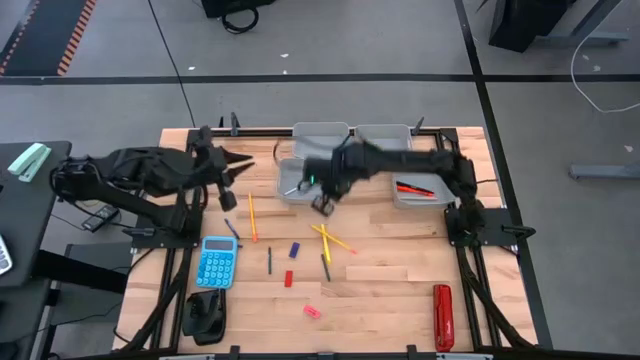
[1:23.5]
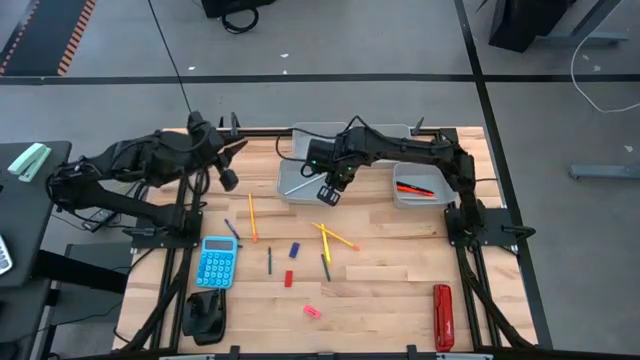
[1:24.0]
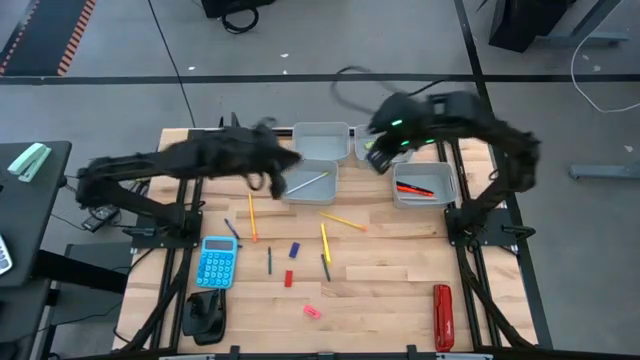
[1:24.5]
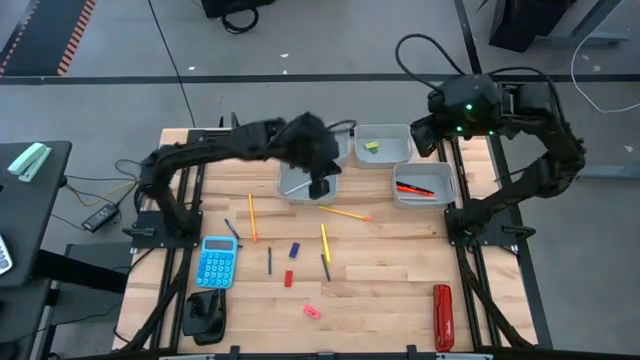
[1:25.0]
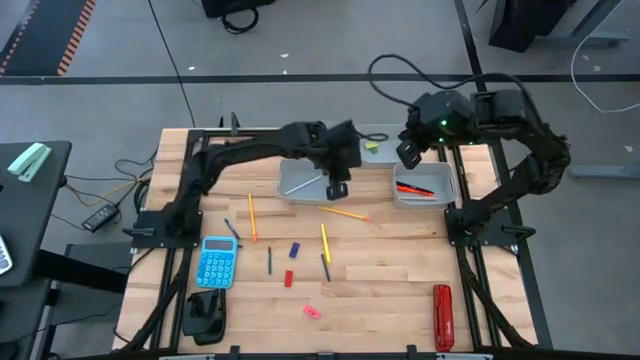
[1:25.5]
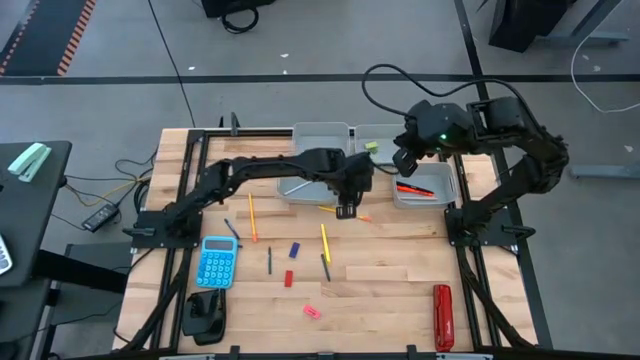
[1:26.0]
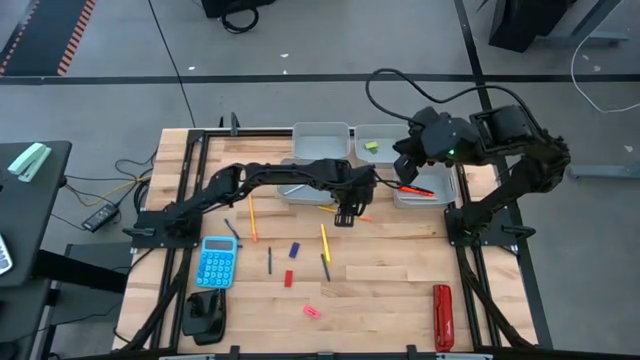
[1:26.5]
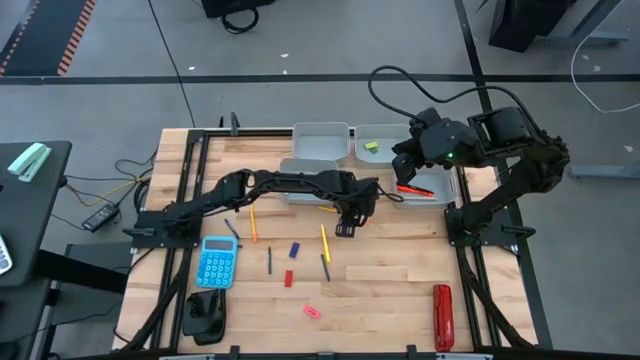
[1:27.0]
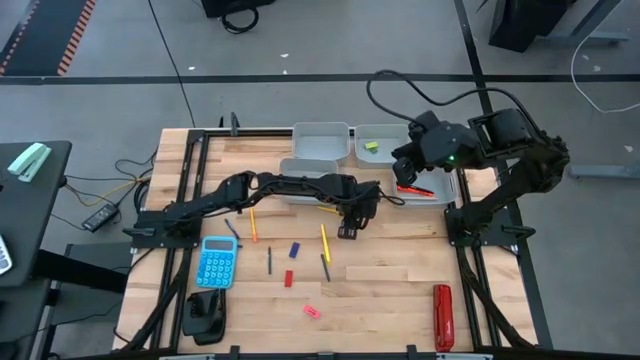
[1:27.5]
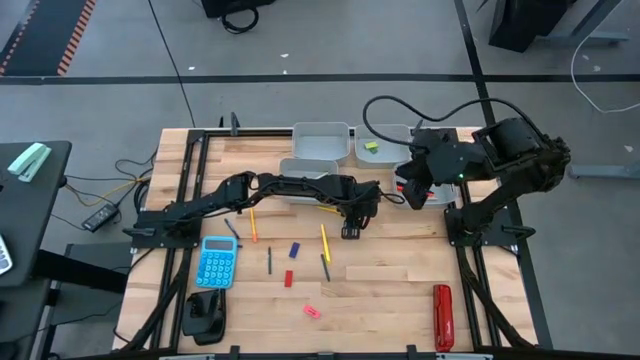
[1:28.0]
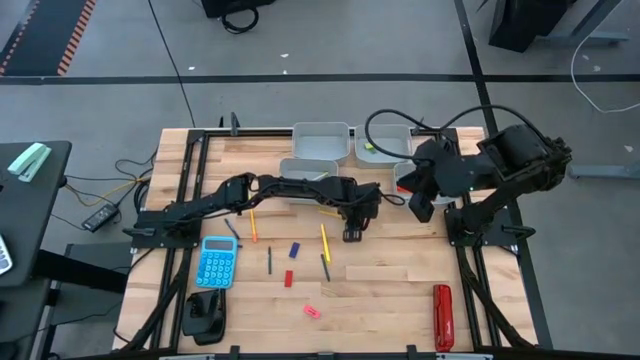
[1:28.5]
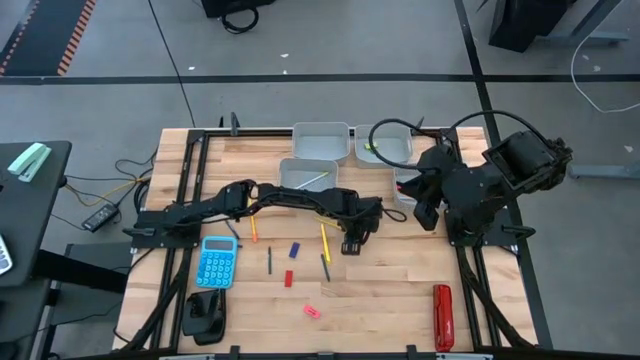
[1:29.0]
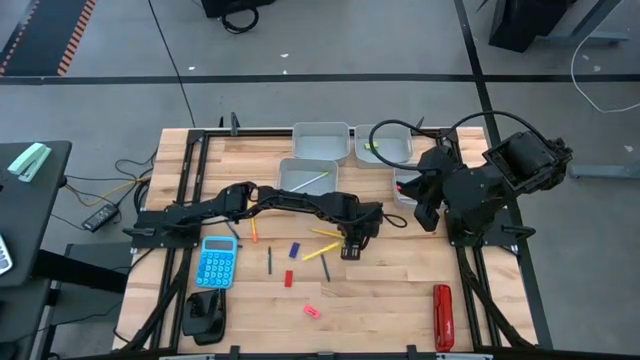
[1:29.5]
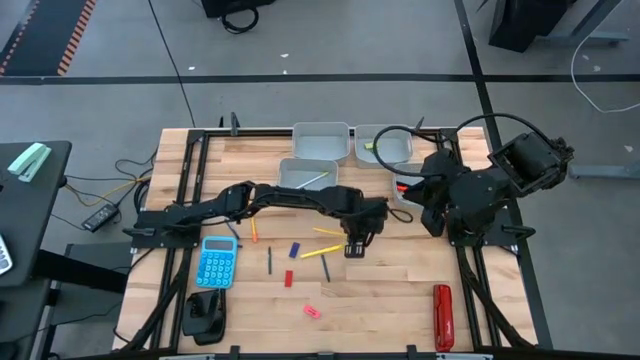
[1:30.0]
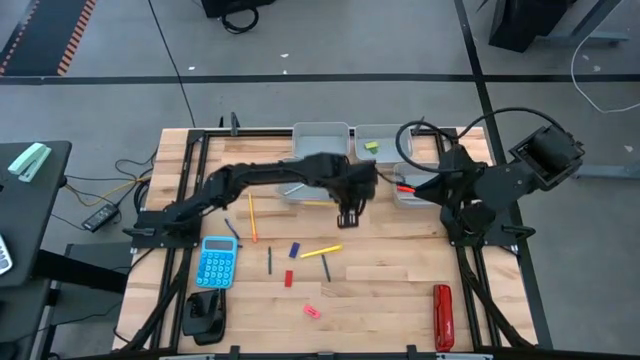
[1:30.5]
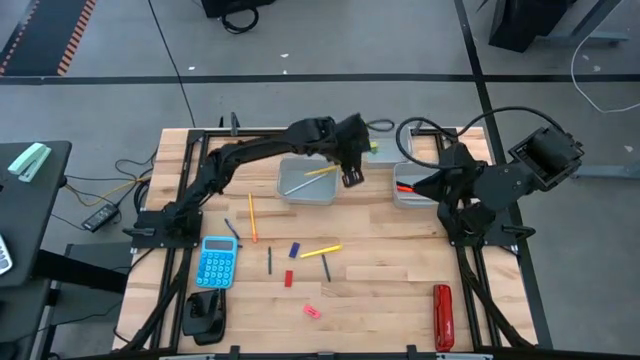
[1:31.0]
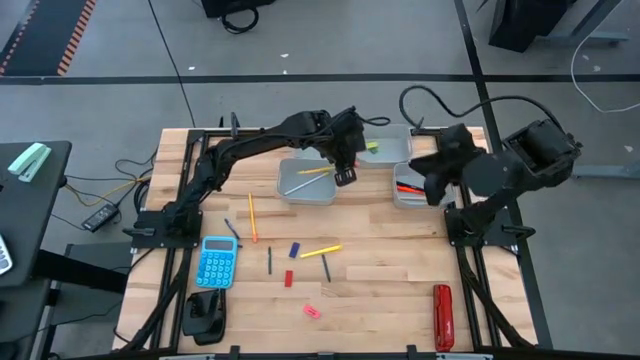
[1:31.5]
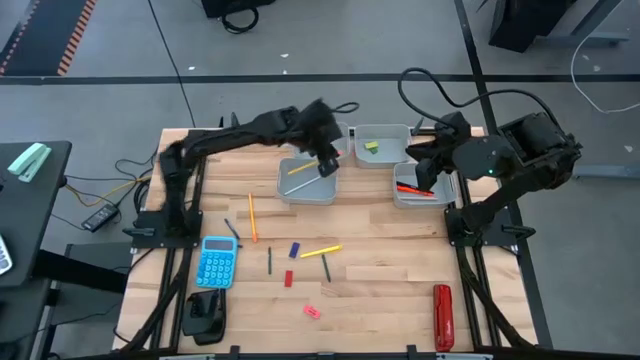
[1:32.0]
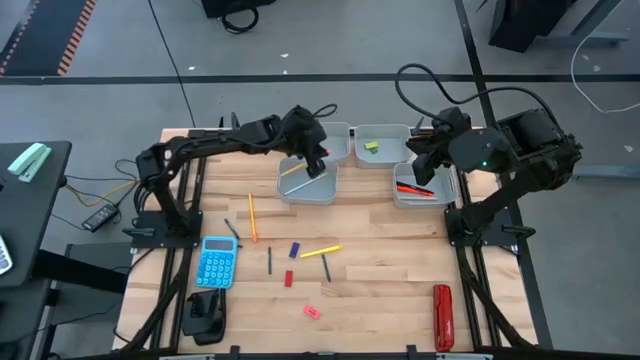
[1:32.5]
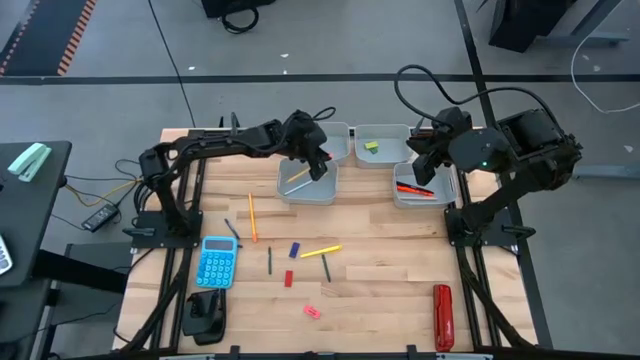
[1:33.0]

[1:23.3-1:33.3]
Task: Sort crayons/erasers/pens/pencils in bins
Put the bottom yellow pencil into the bottom left gray bin

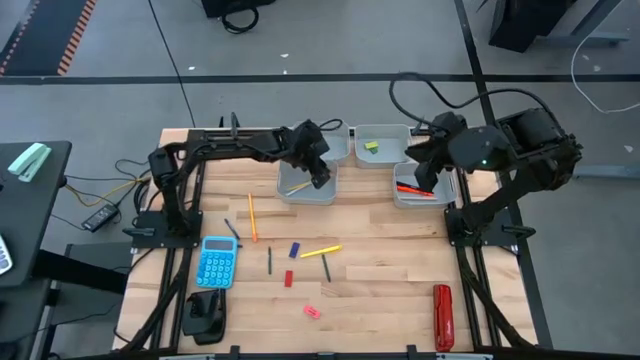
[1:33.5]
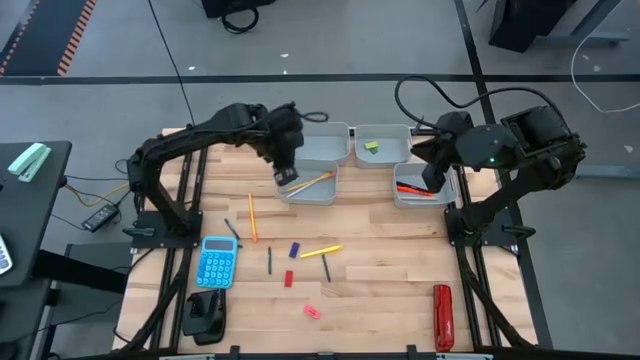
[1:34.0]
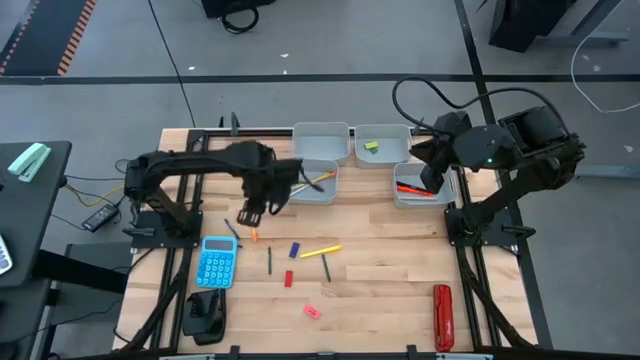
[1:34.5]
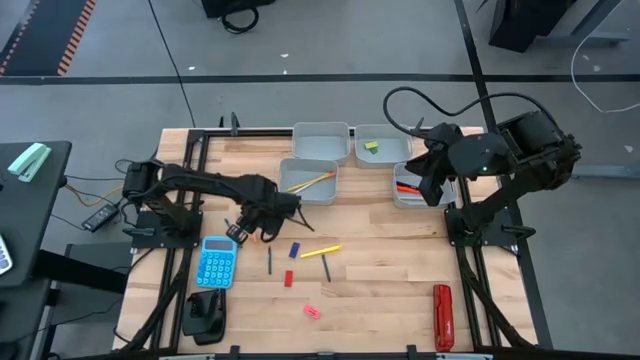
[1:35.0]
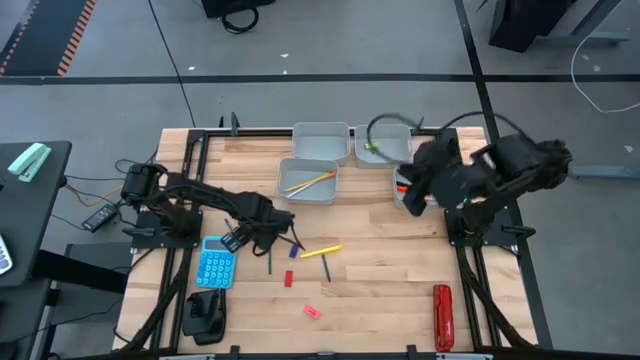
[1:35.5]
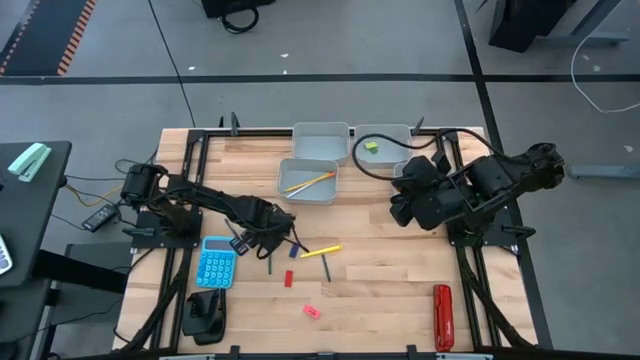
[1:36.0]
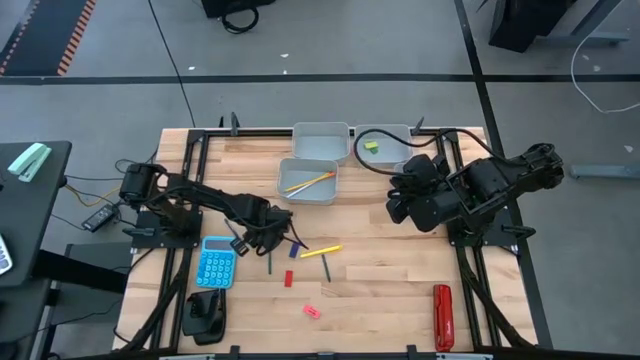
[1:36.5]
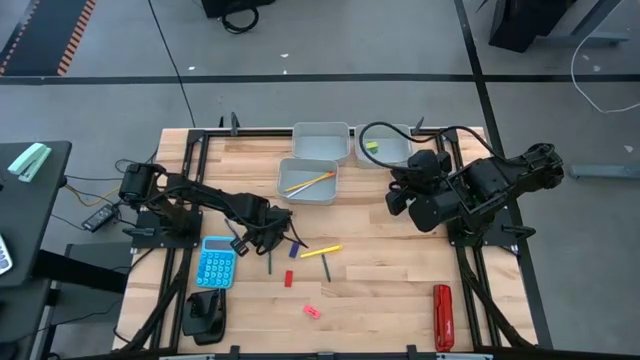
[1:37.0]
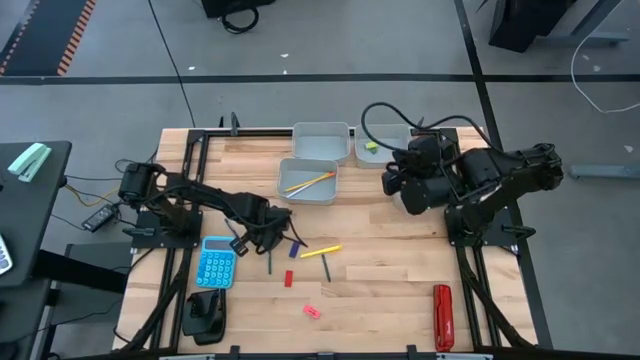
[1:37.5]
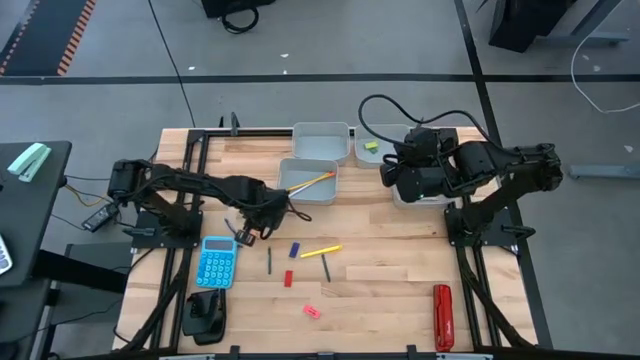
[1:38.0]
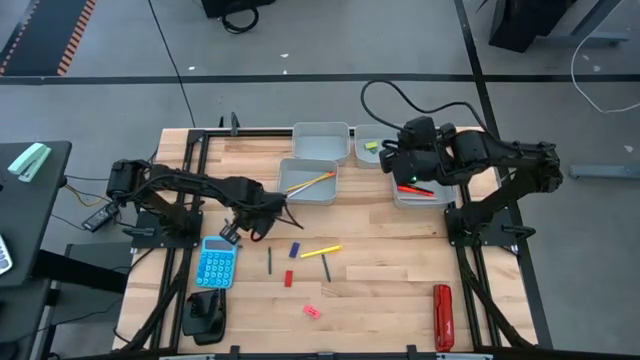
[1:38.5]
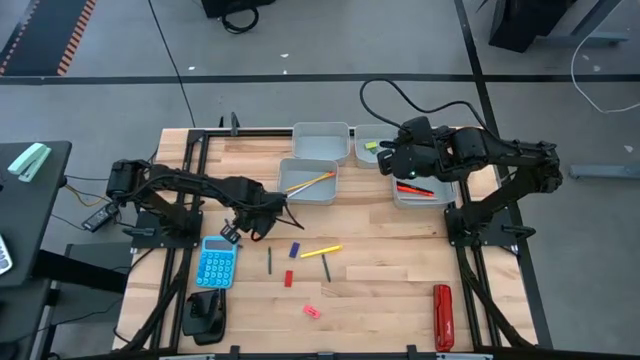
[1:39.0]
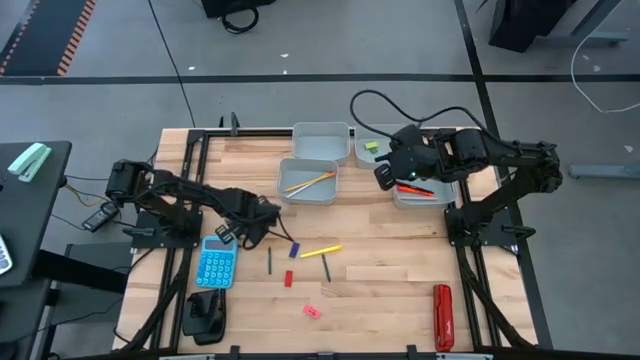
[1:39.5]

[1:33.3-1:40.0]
Put the yellow pencil into the bottom left gray bin

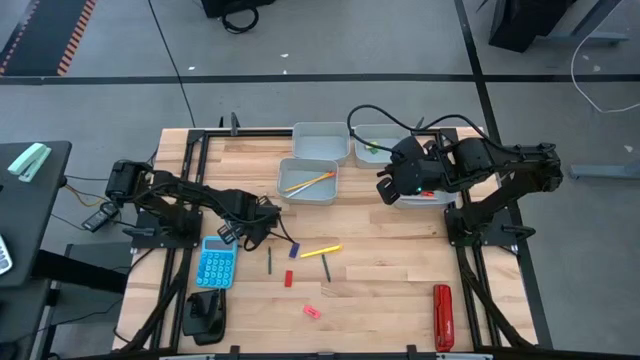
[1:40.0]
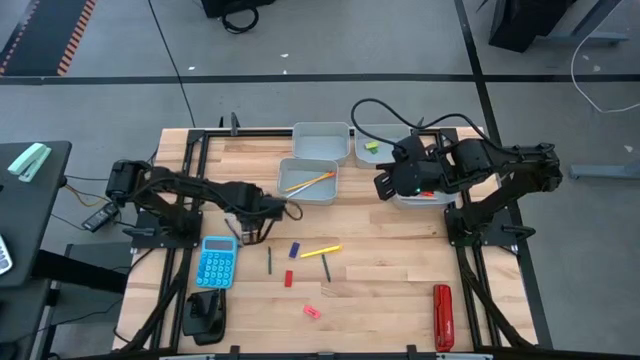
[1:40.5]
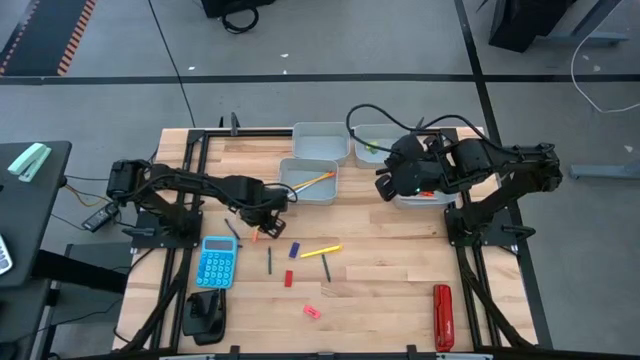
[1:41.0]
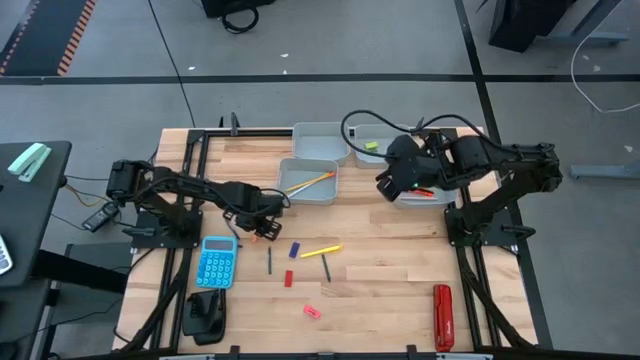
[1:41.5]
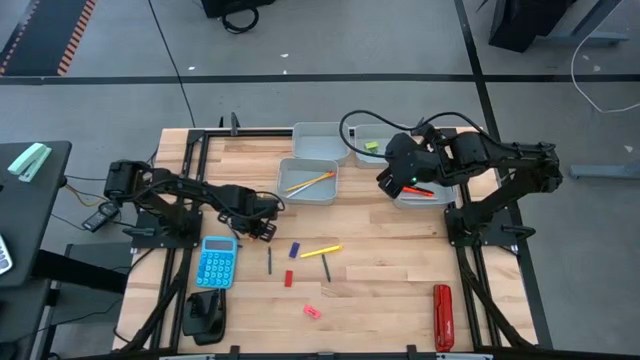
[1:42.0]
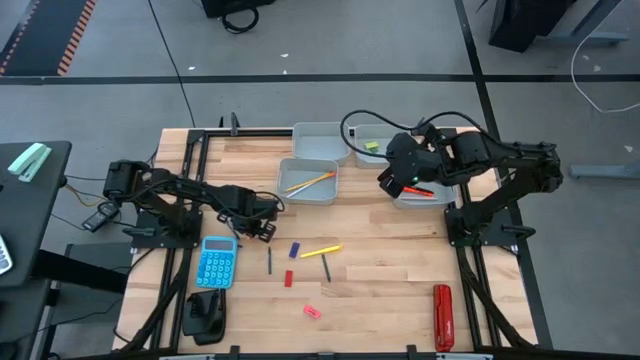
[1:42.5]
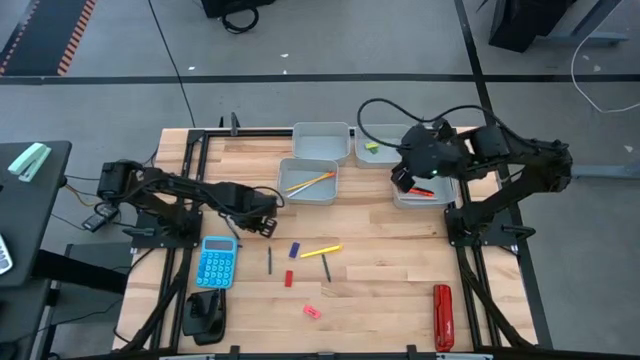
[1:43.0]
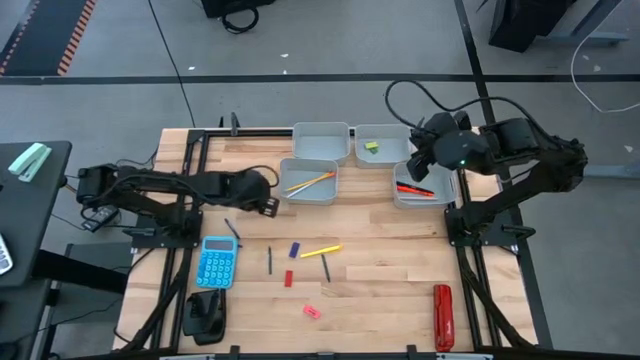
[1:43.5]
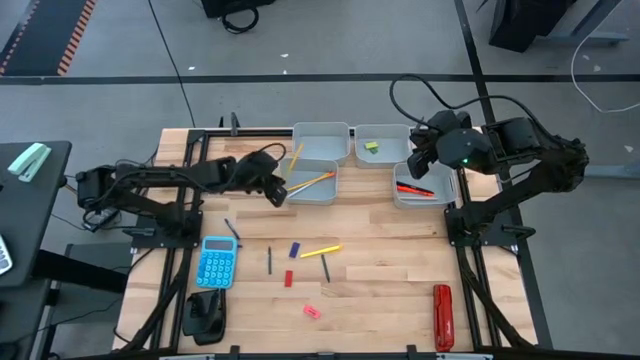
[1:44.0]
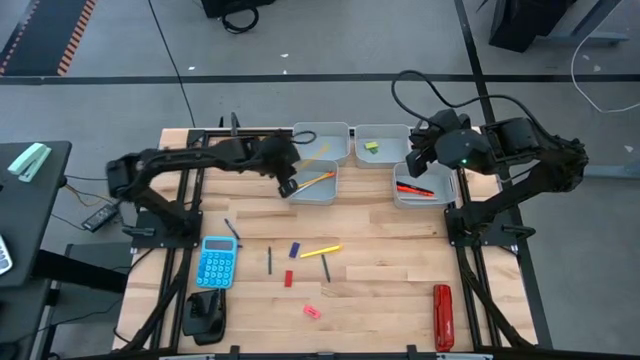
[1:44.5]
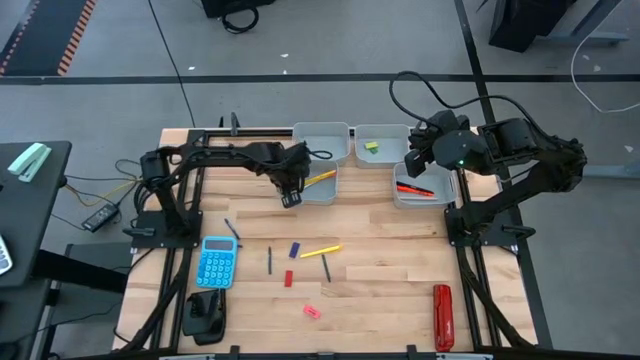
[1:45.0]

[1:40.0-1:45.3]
Put the yellow pencil into the bottom left gray bin
